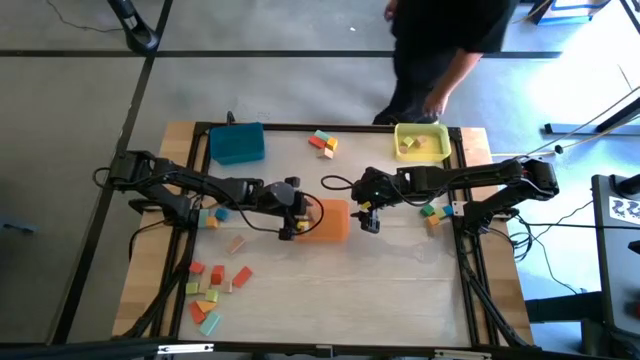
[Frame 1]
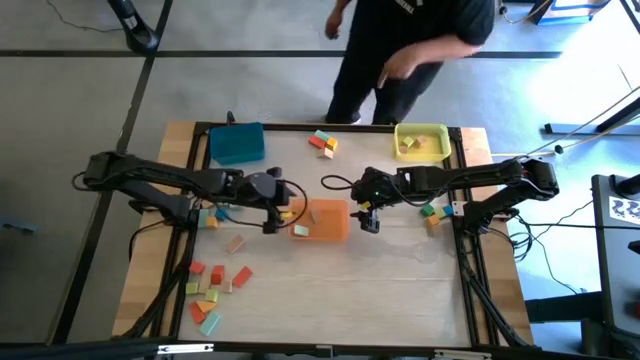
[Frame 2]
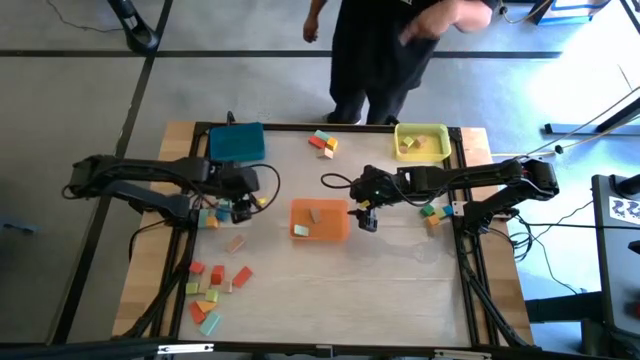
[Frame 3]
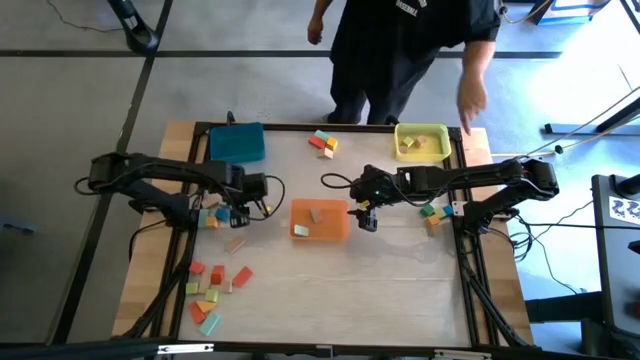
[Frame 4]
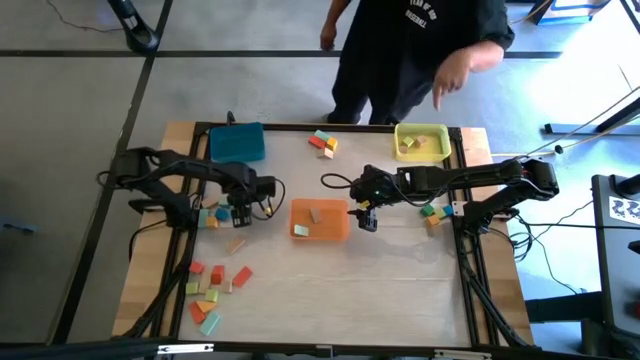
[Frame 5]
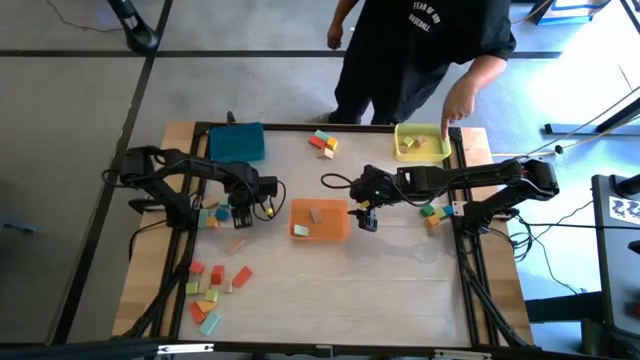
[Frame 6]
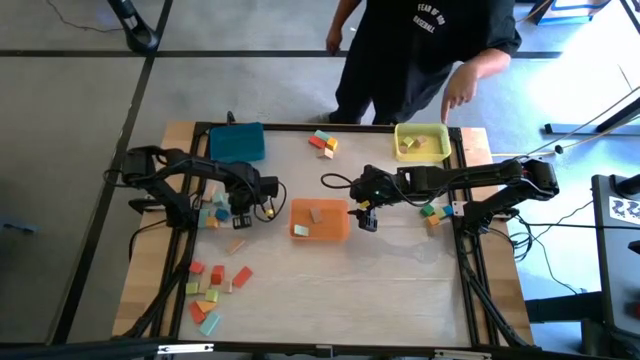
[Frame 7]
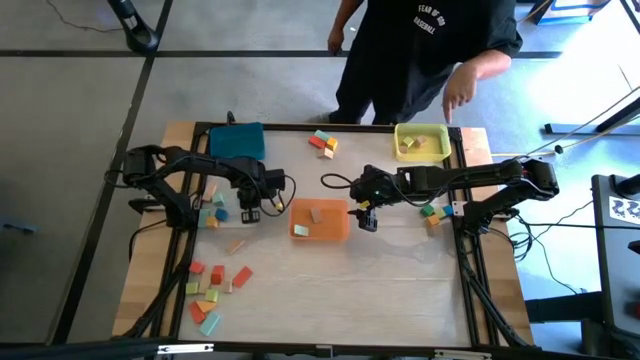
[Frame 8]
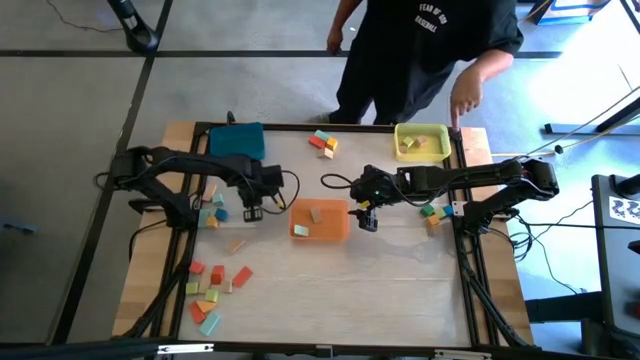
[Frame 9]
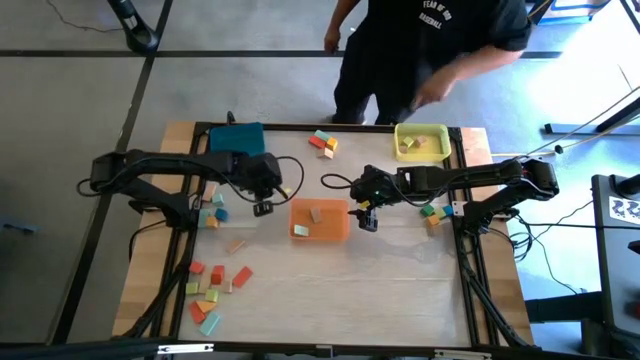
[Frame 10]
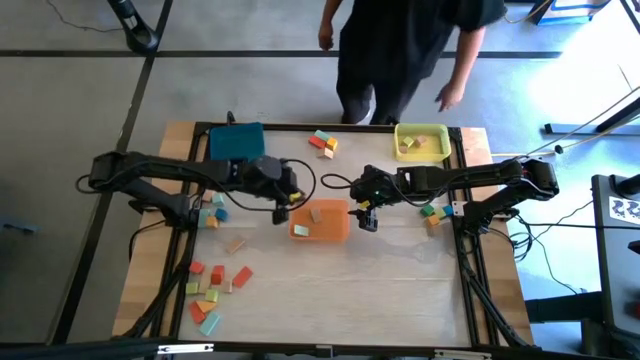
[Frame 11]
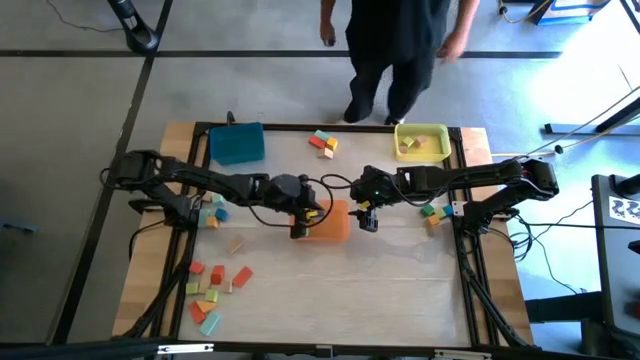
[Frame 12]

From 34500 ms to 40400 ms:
Task: Sort blocks by size
Put the blue triangular block into the orange bin

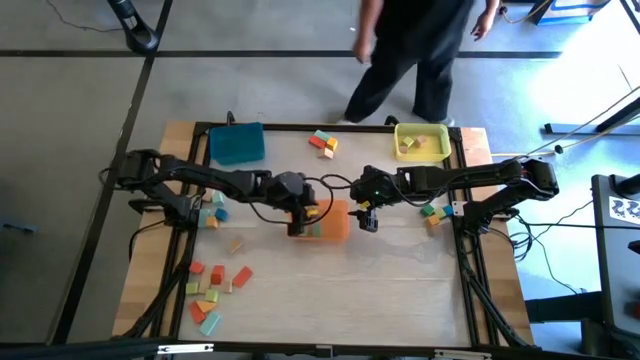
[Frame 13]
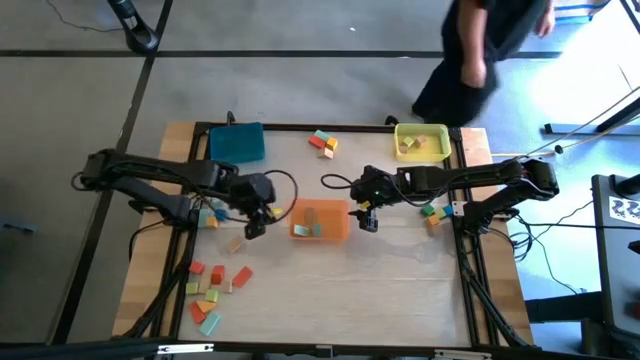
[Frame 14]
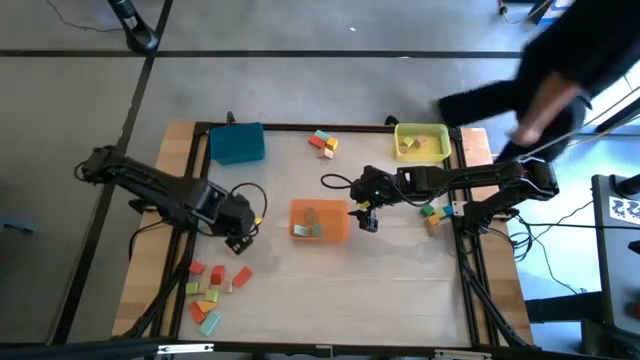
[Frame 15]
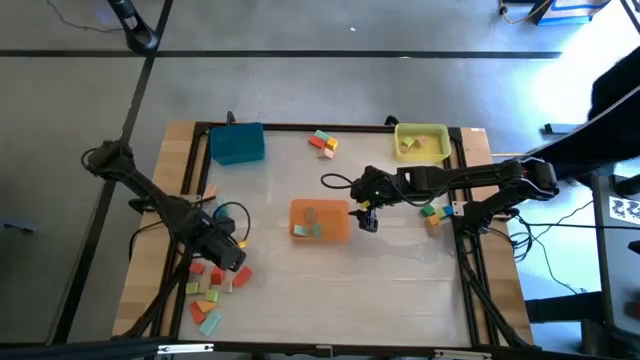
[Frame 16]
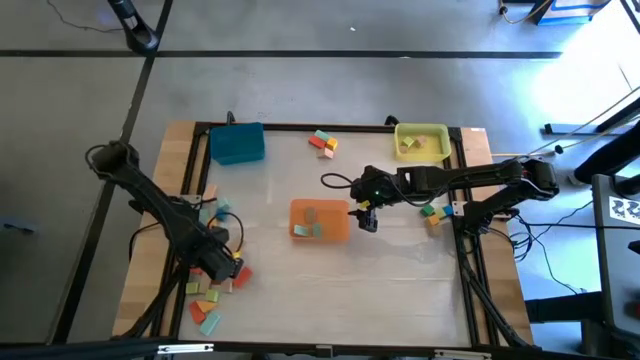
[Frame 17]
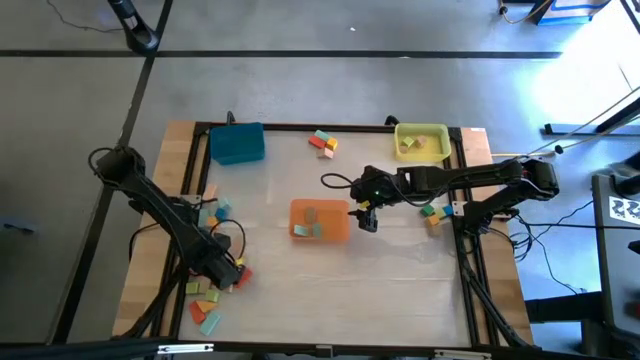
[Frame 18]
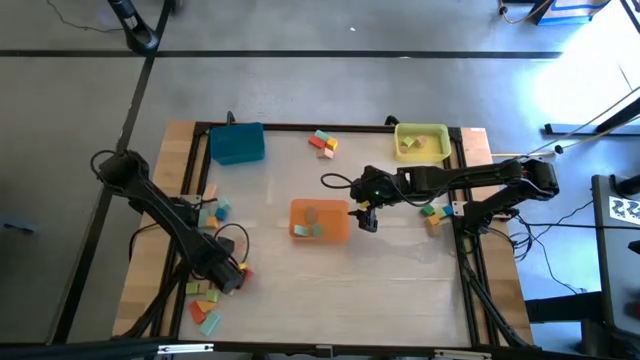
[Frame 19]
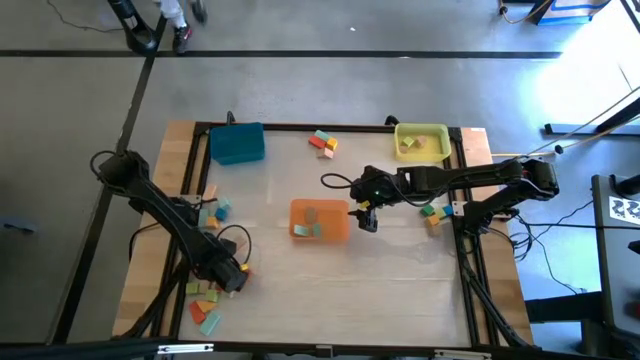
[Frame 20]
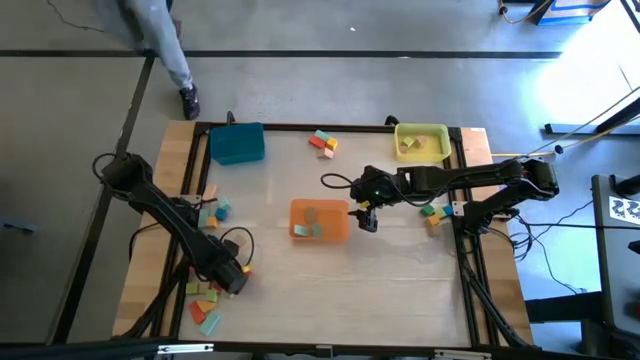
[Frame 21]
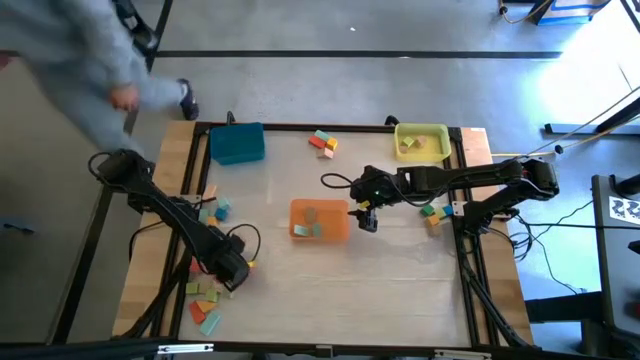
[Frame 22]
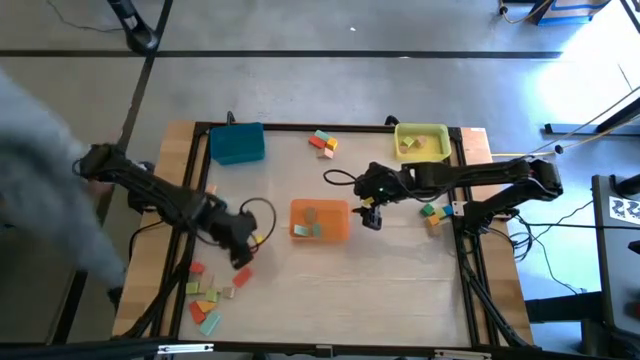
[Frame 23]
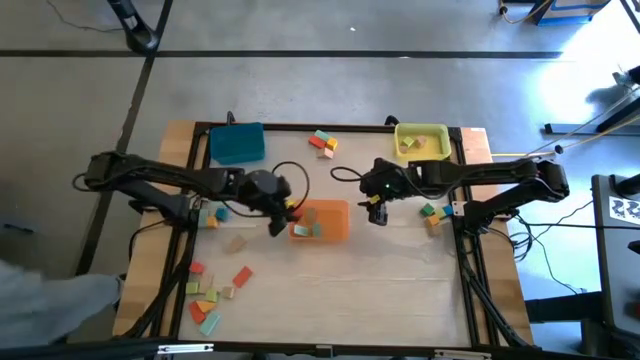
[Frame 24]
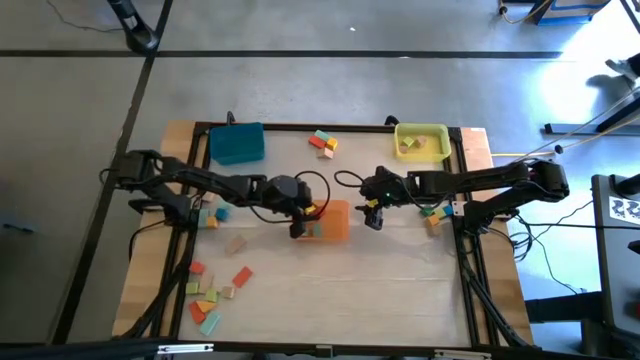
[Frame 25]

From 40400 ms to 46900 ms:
Put the orange triangular block into the orange bin

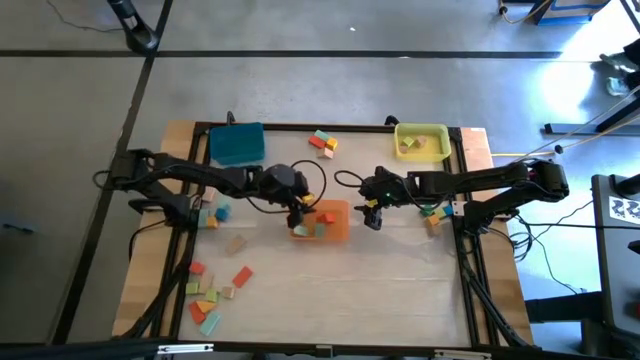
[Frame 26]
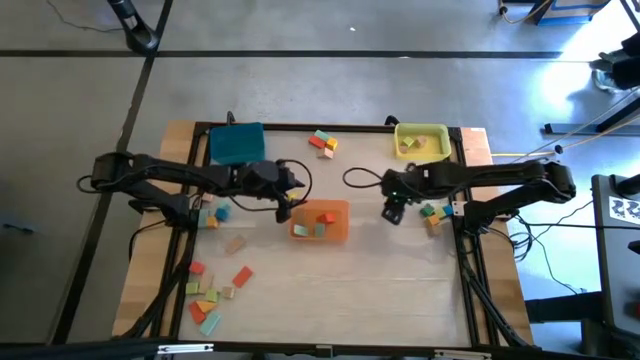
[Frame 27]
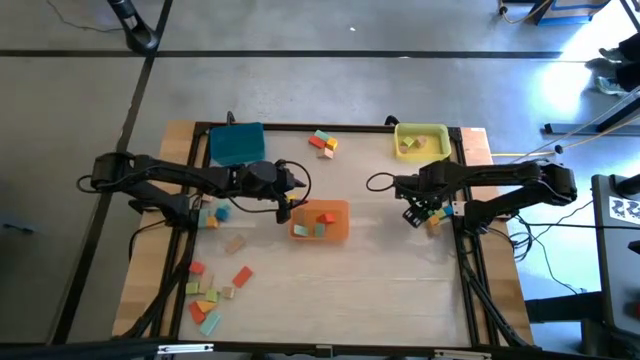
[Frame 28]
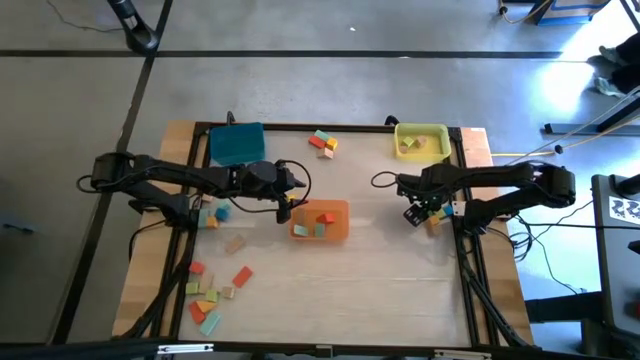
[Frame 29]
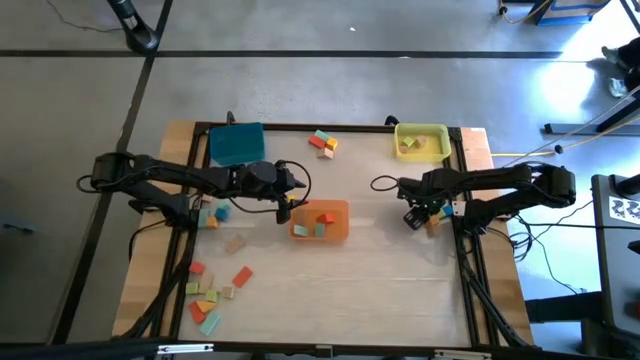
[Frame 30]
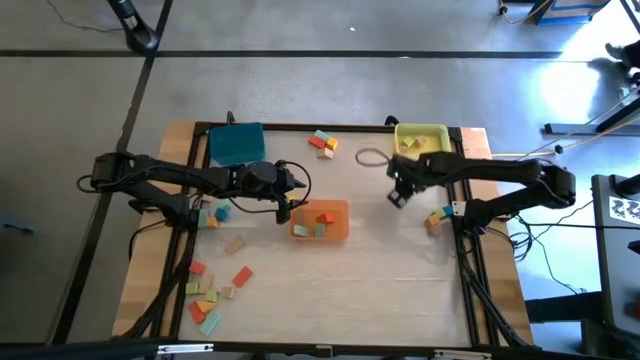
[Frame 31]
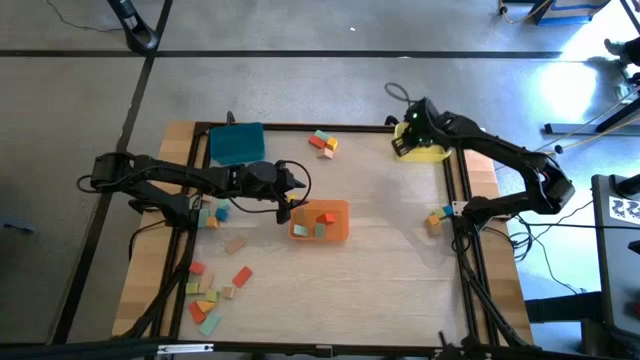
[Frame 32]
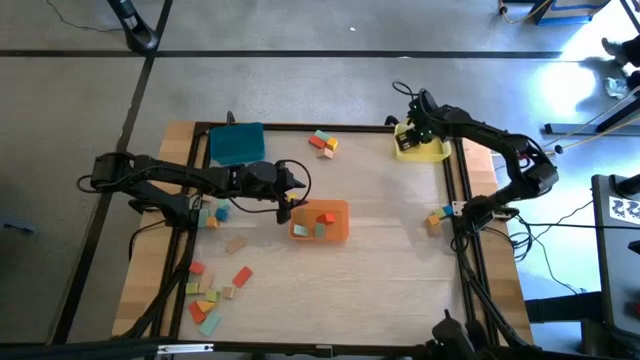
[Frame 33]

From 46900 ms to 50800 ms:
Put the dark green cube block into the yellow bin

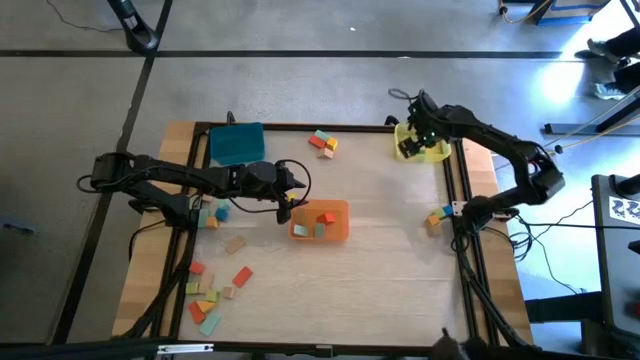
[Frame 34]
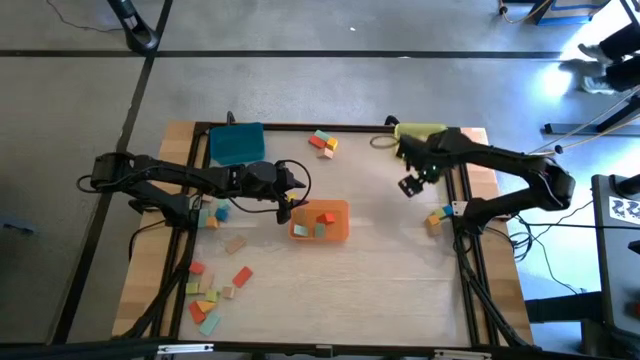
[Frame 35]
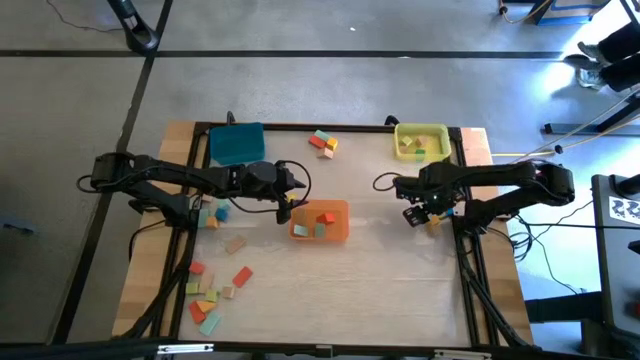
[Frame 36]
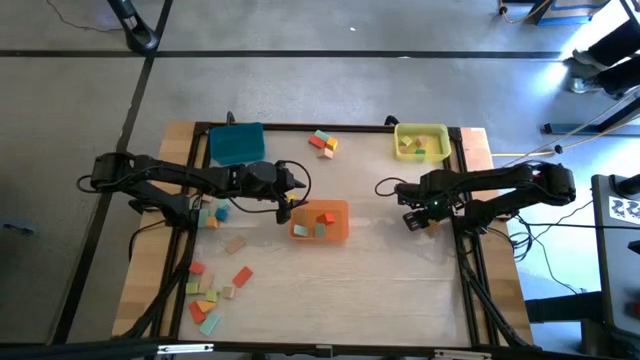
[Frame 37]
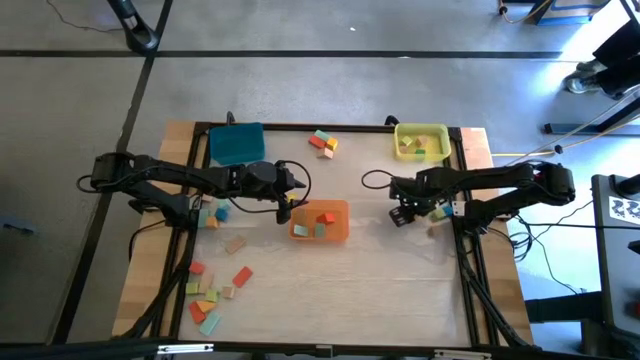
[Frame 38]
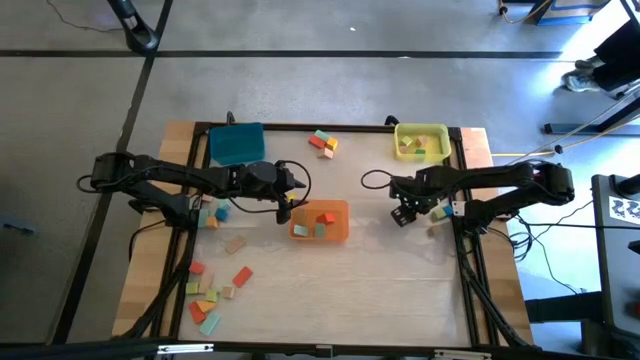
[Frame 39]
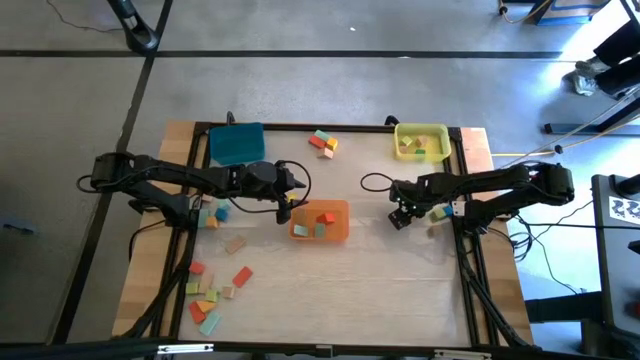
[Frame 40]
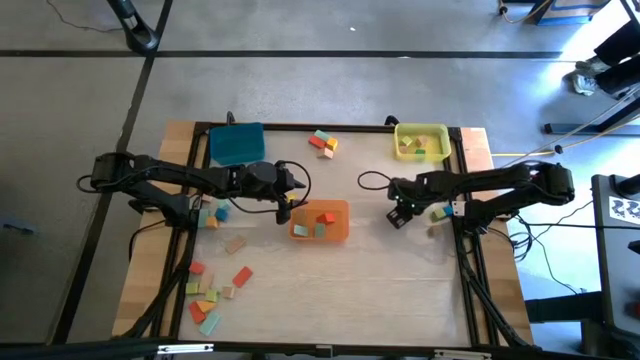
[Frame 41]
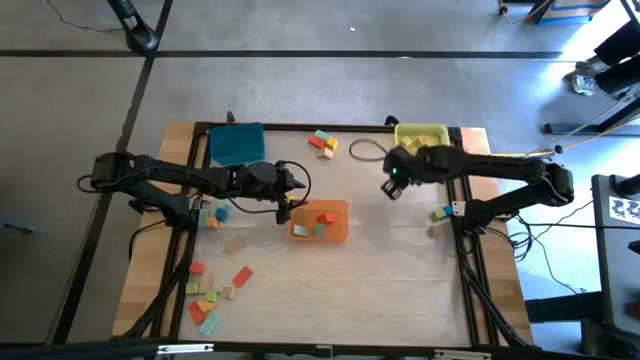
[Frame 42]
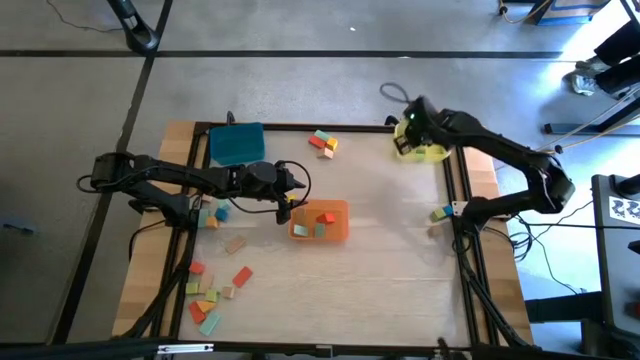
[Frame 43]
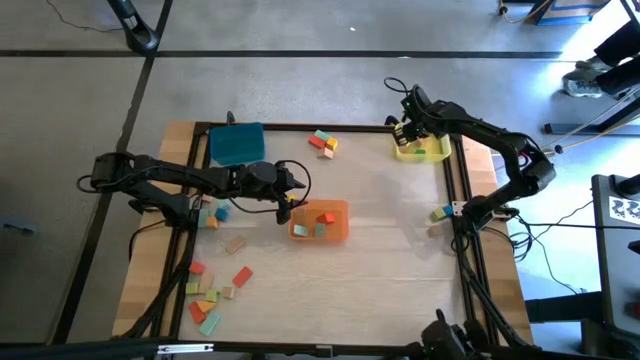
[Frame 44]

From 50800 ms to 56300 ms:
Put the yellow cube block into the yellow bin
